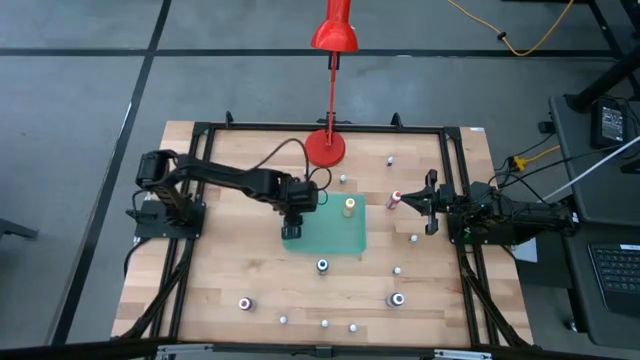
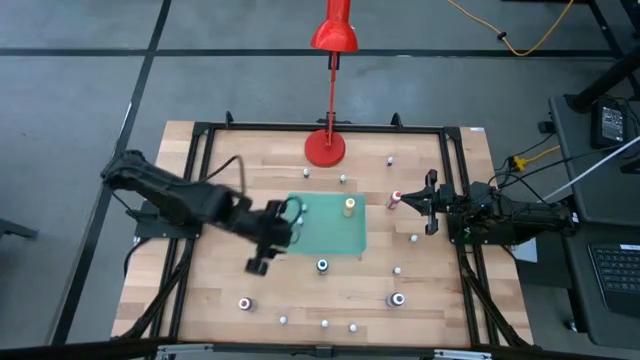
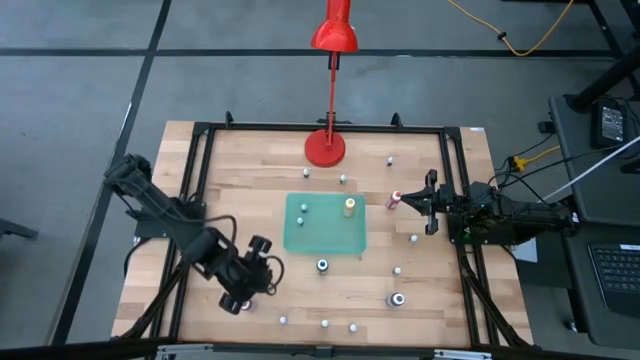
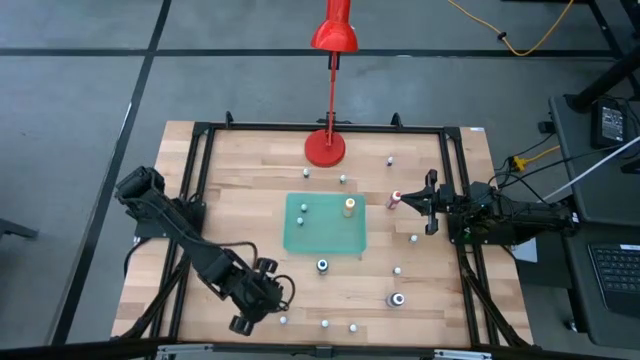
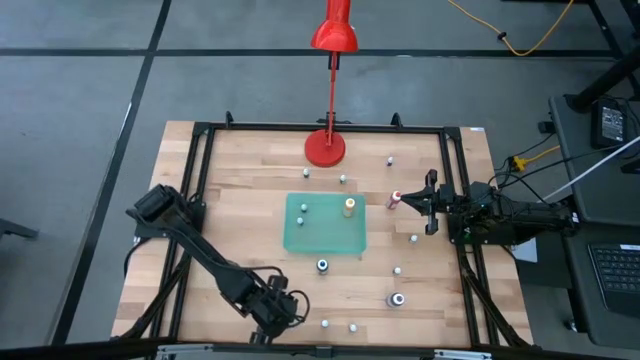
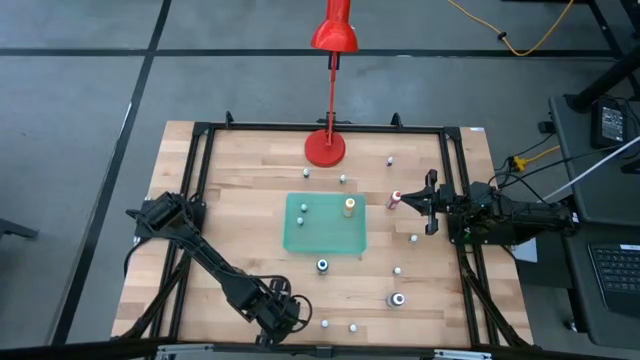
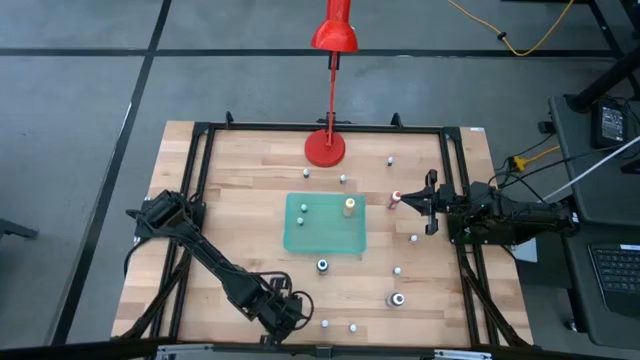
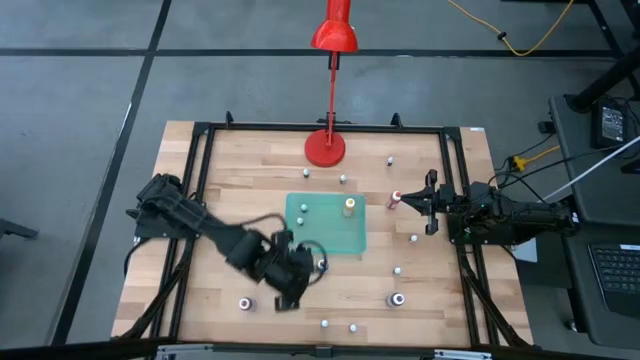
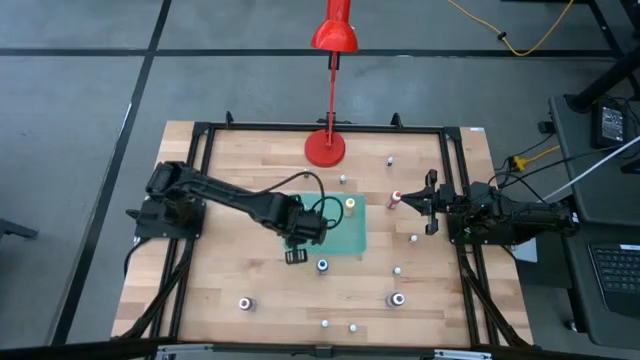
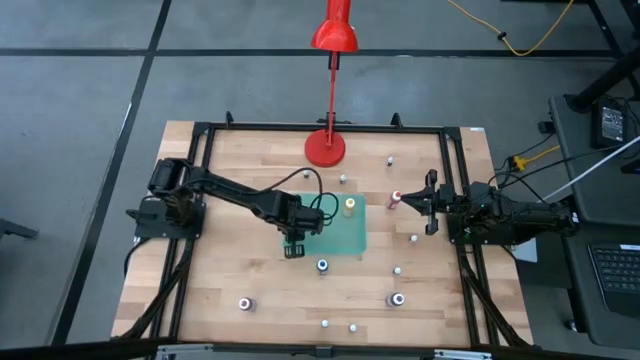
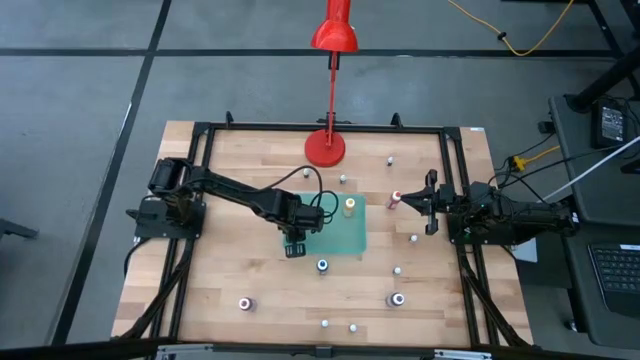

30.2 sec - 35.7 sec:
Task: Pick & Place food coloring
Put the small red food coloring bottle into the green bin

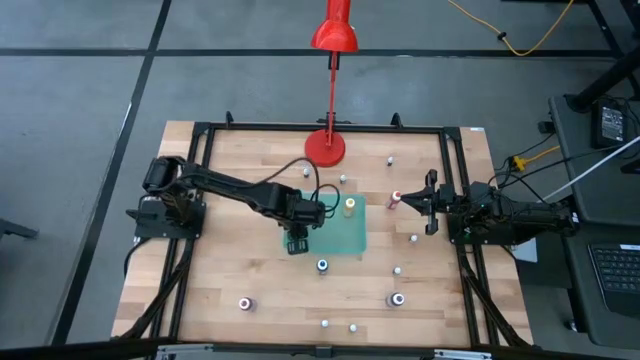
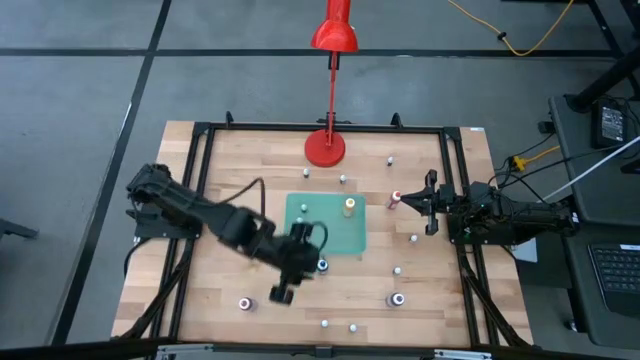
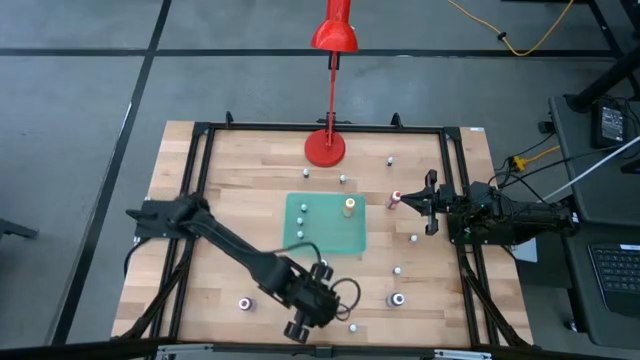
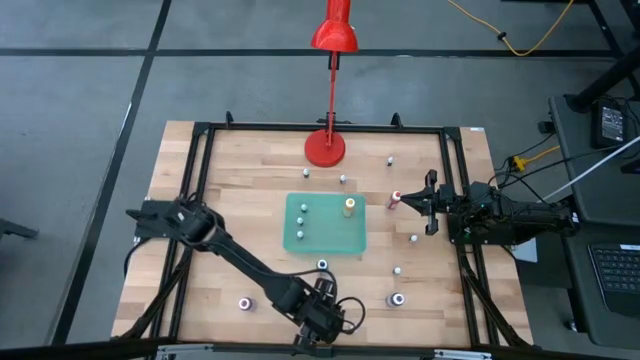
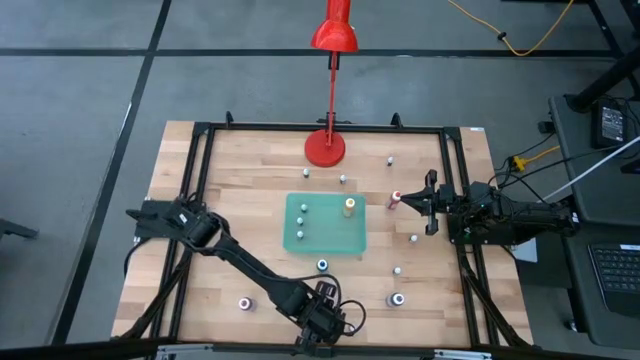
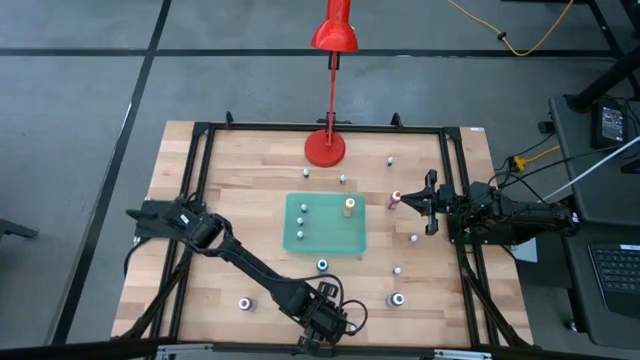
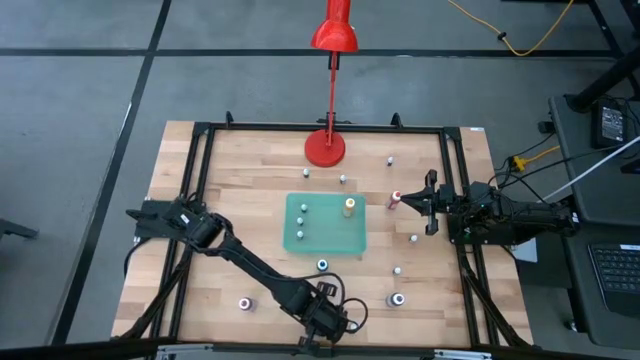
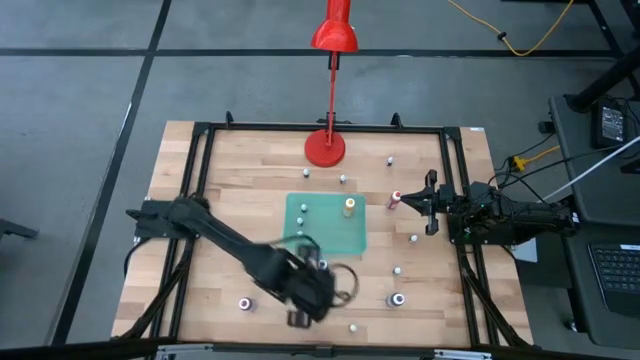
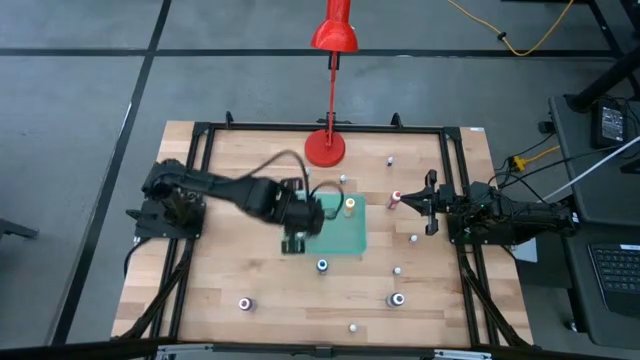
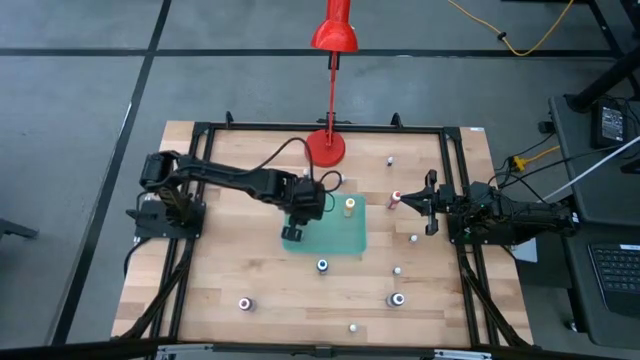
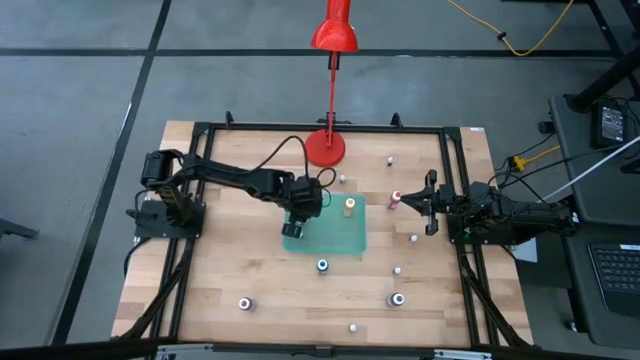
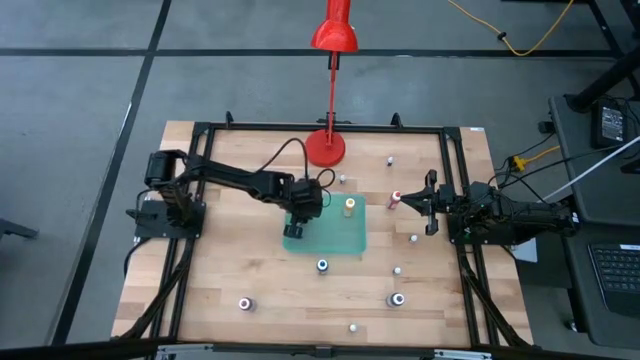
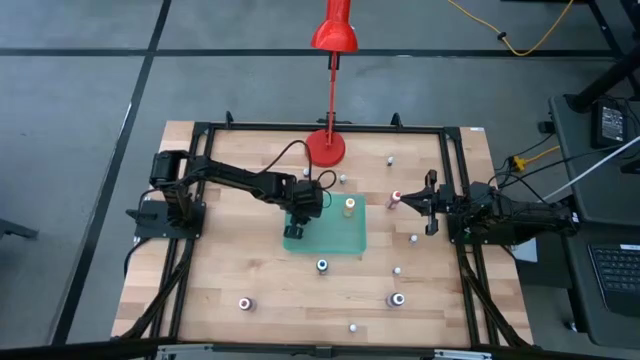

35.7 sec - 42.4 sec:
Put the bottom small green food coloring bottle into the green bin

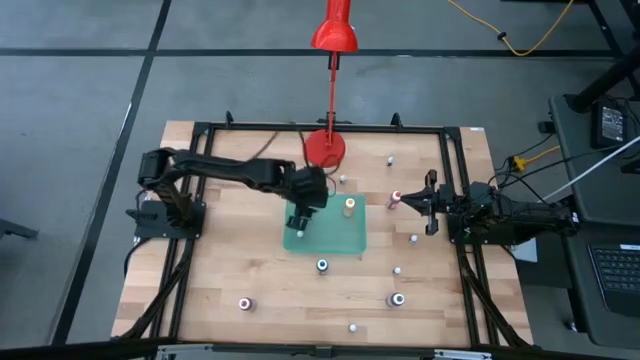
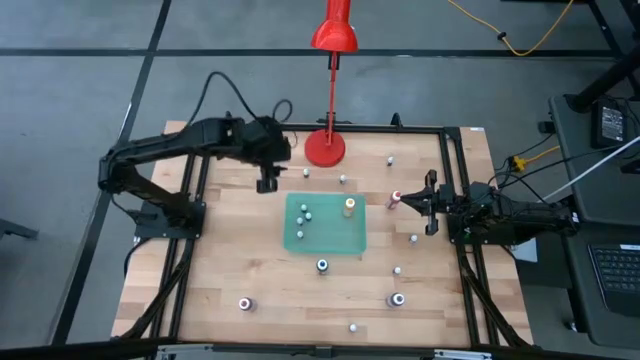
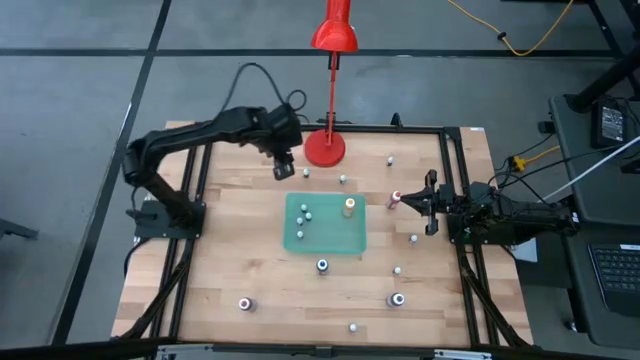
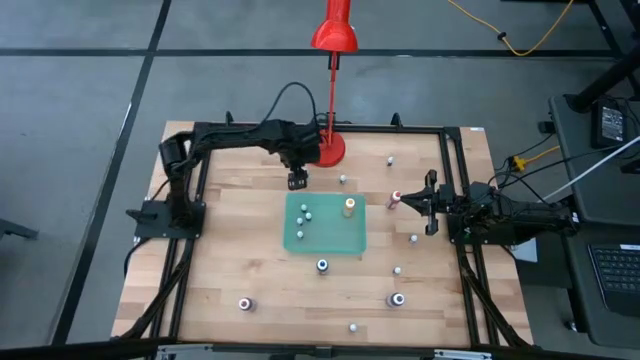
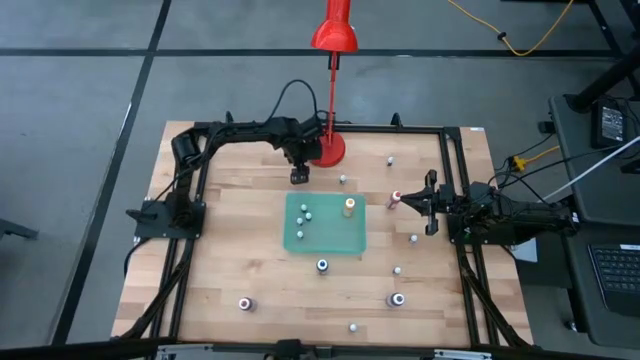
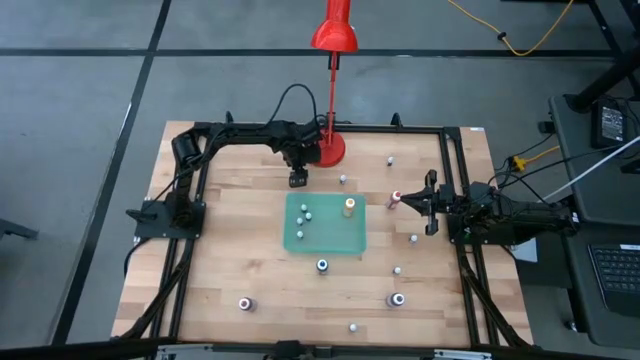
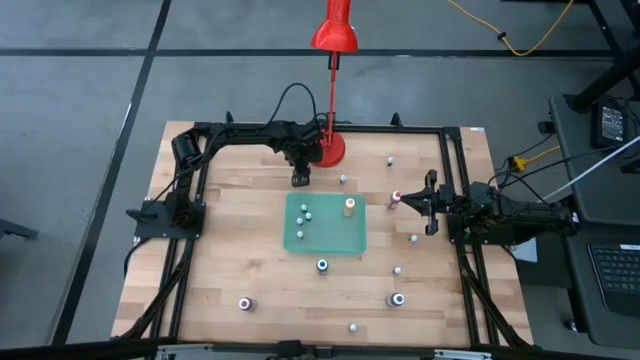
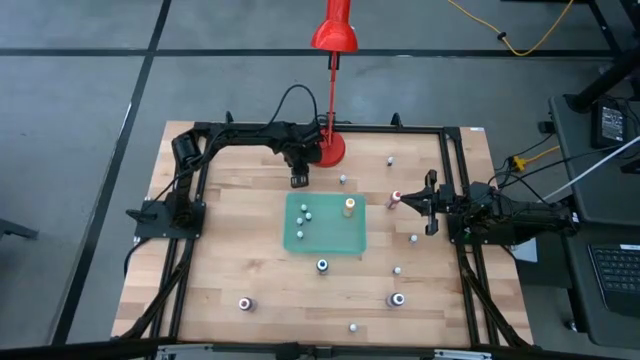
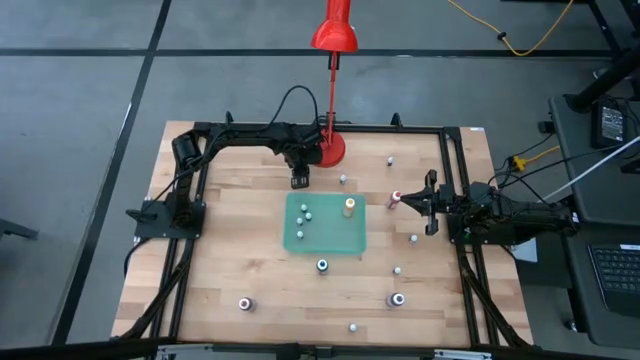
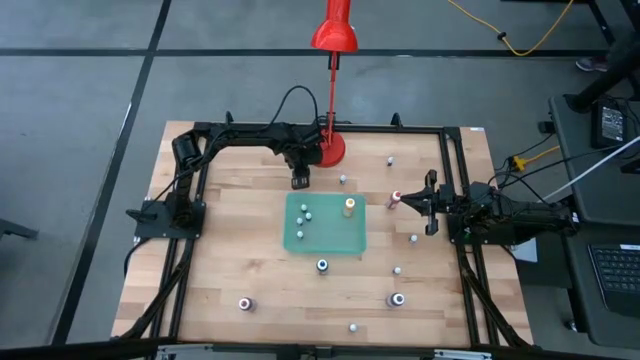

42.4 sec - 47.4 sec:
Put the small blue food coloring bottle into the green bin

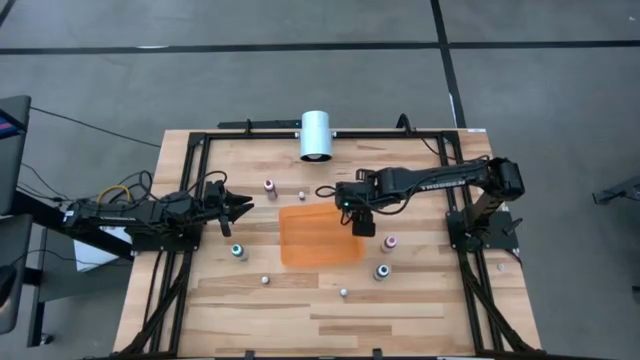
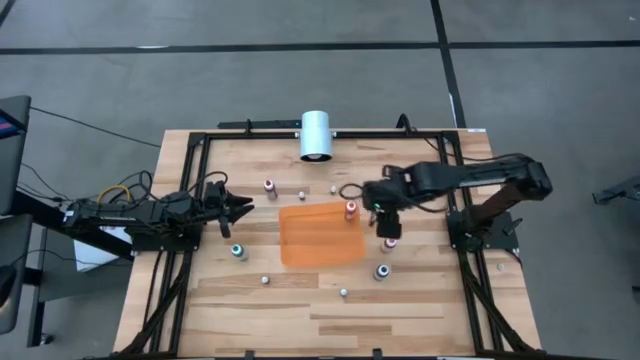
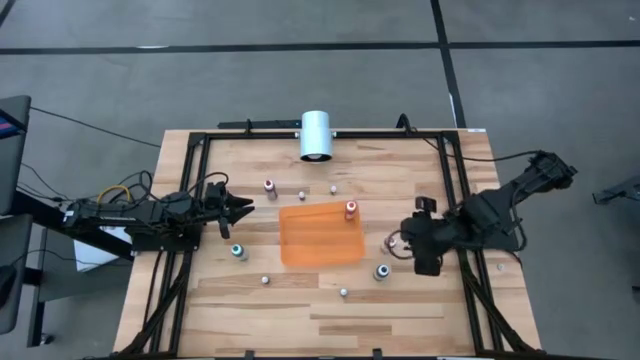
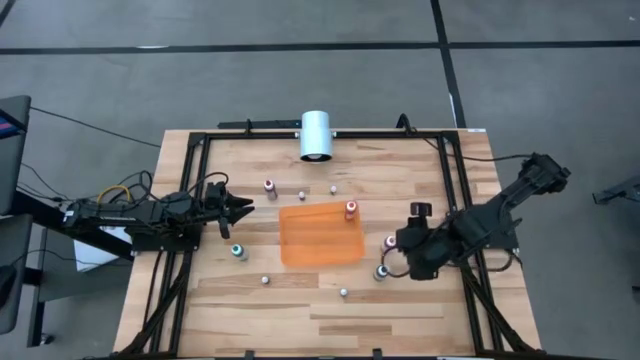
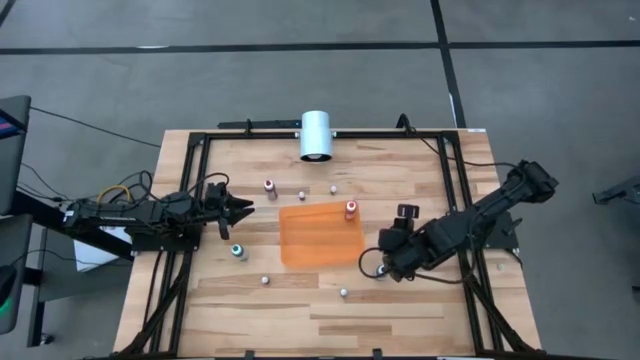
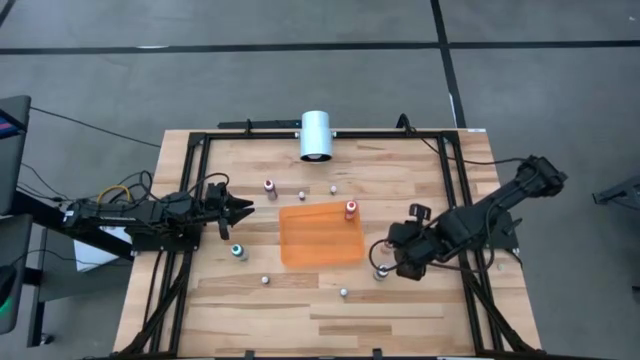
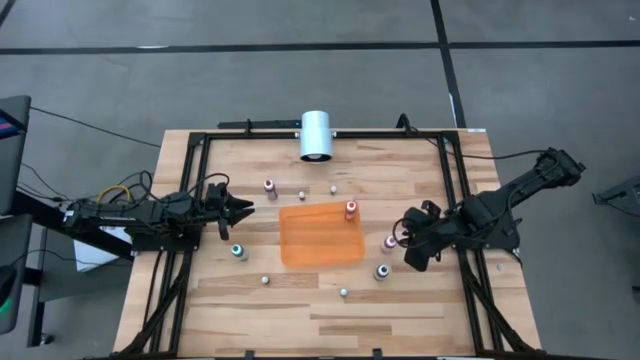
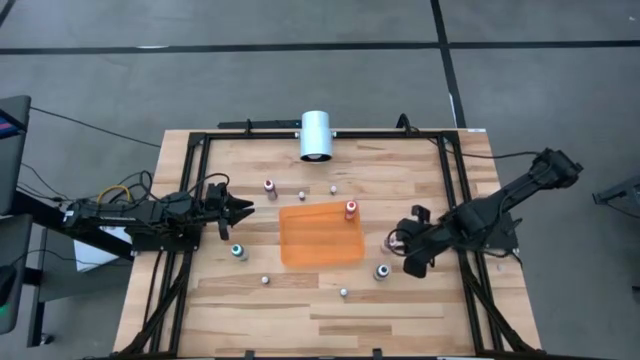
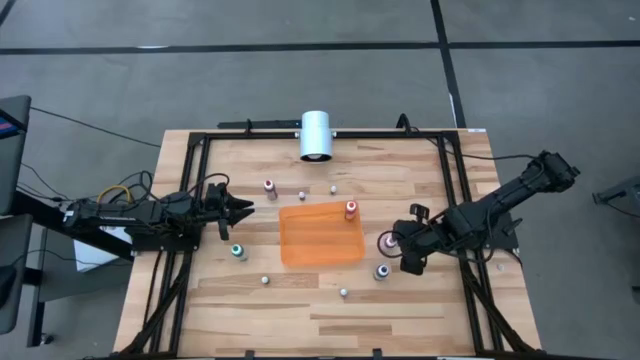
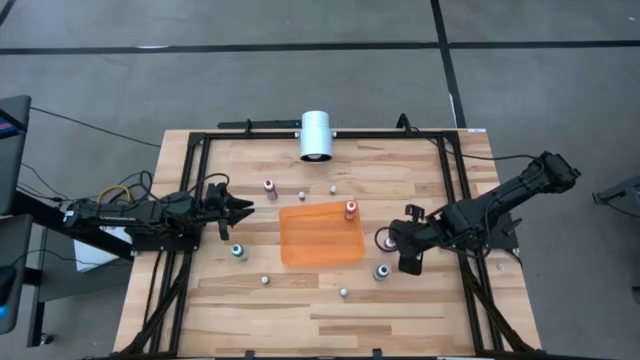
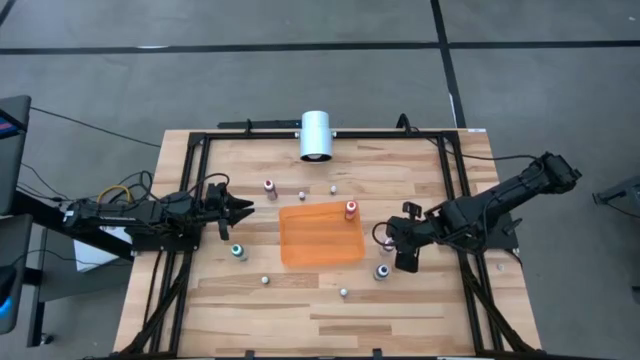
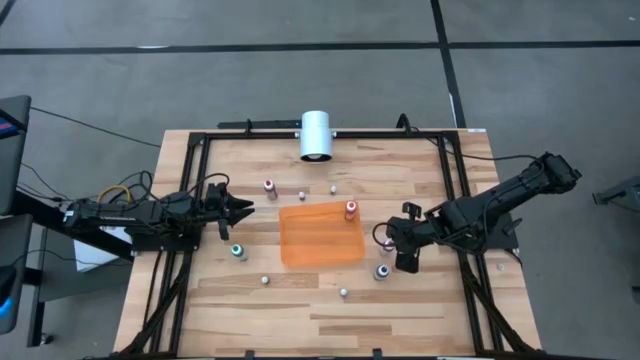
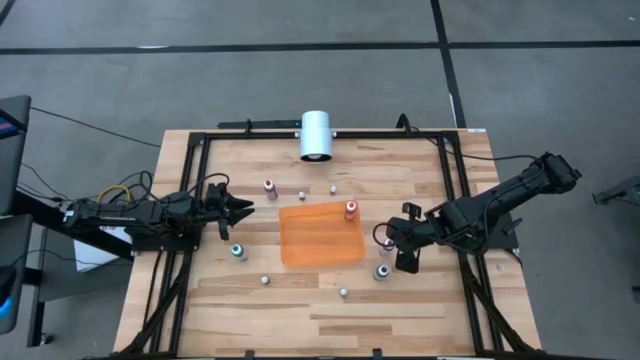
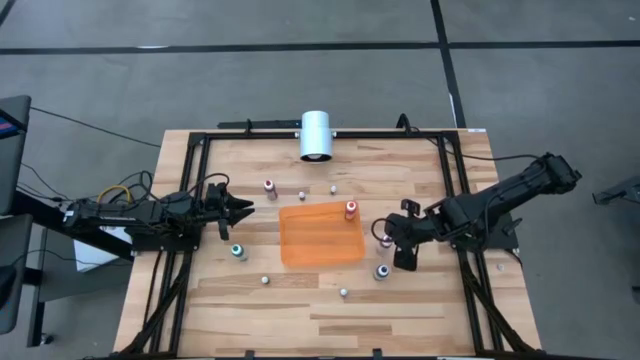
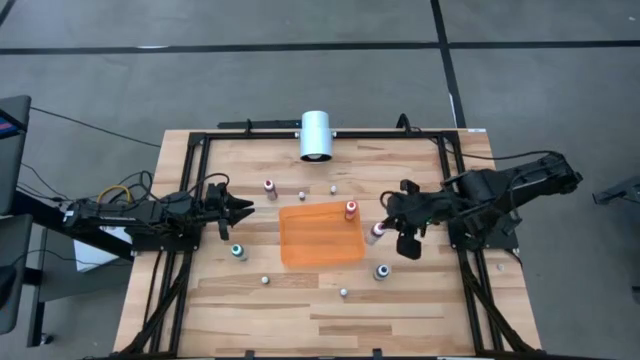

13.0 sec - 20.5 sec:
Task: Pick & Place food coloring
Put the large pink food coloring bottle into the orange container
